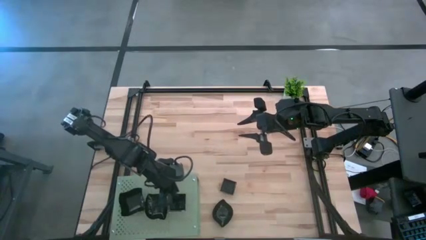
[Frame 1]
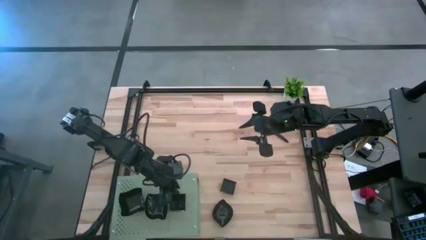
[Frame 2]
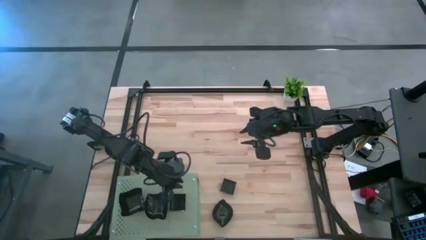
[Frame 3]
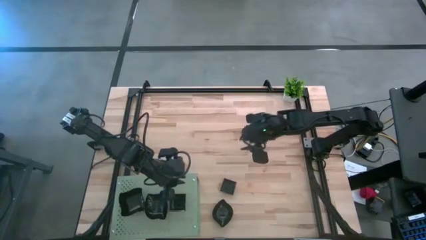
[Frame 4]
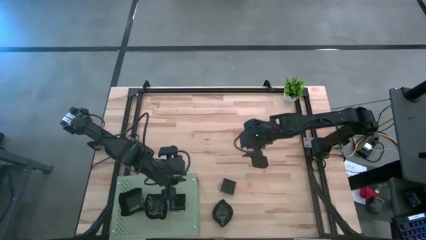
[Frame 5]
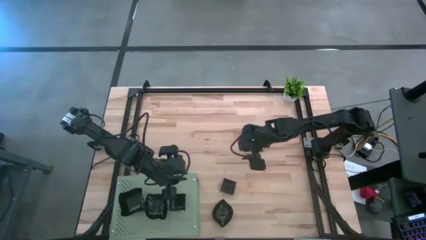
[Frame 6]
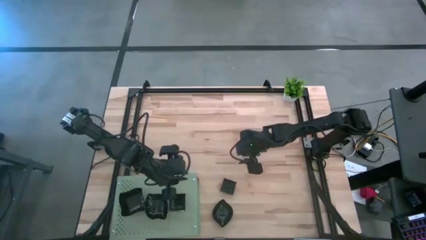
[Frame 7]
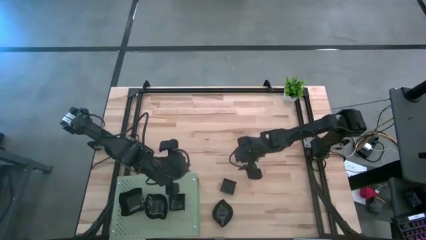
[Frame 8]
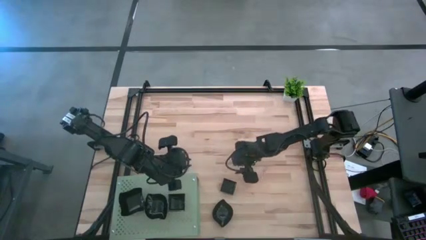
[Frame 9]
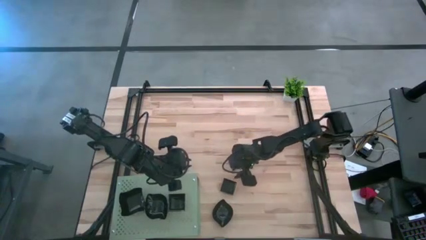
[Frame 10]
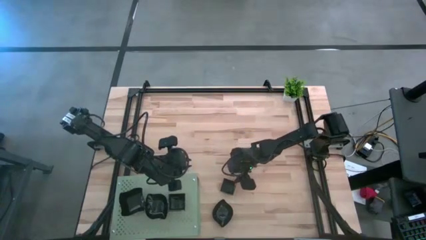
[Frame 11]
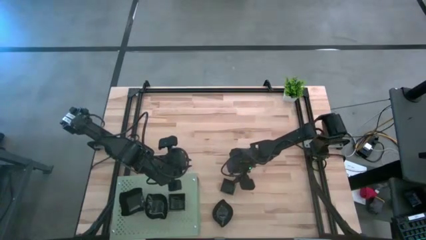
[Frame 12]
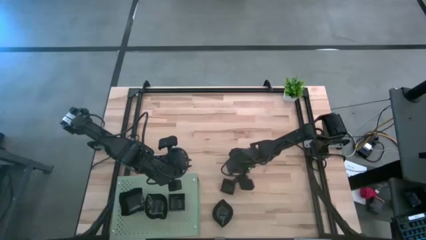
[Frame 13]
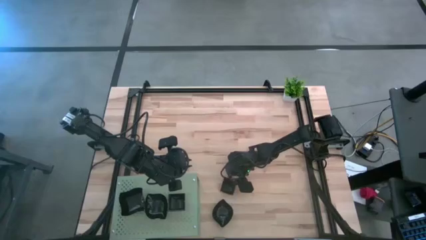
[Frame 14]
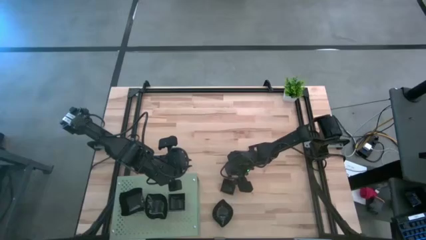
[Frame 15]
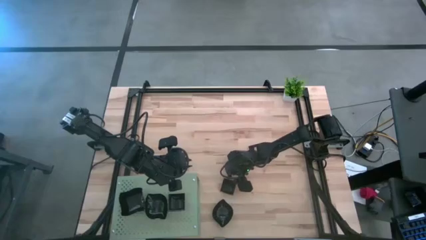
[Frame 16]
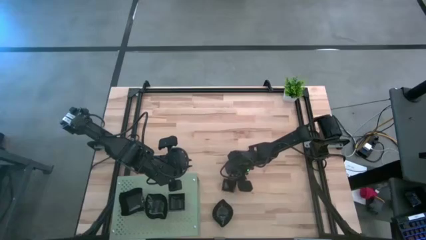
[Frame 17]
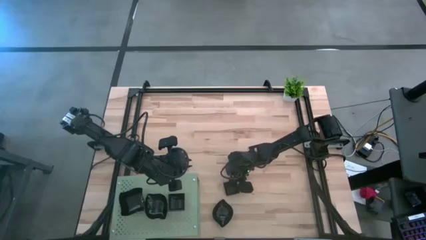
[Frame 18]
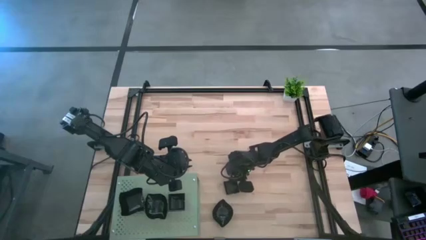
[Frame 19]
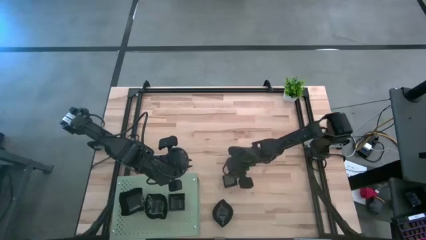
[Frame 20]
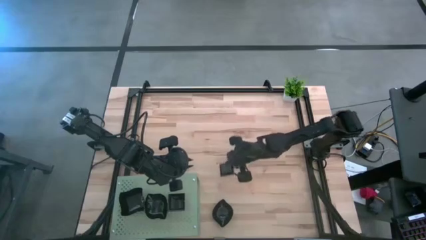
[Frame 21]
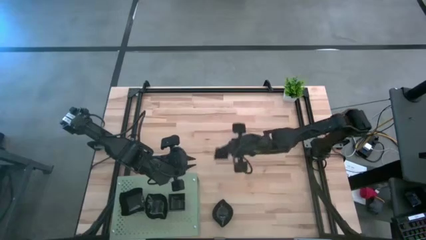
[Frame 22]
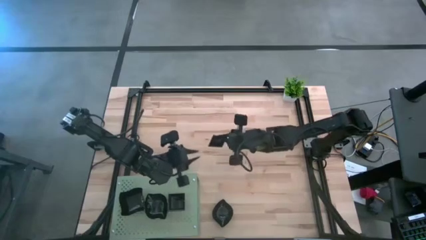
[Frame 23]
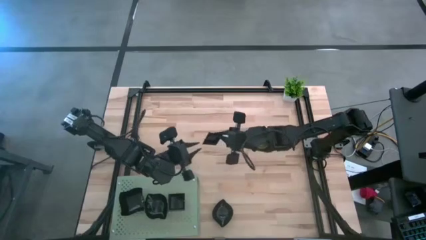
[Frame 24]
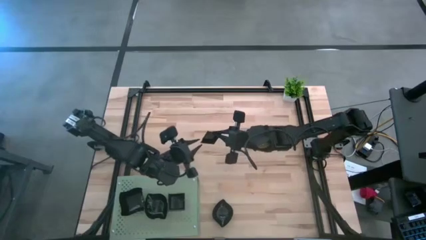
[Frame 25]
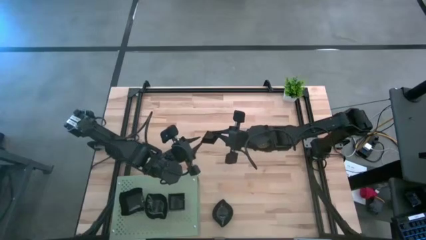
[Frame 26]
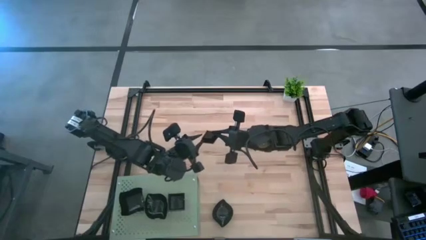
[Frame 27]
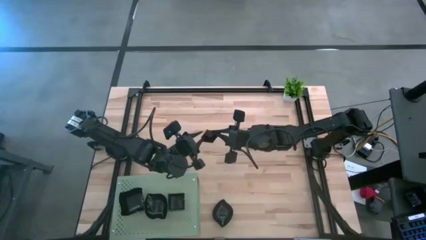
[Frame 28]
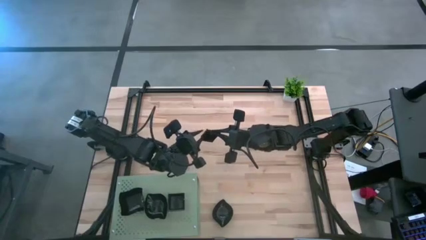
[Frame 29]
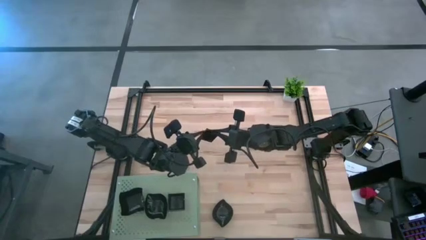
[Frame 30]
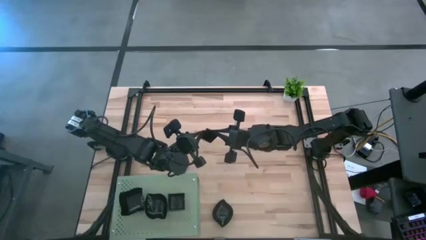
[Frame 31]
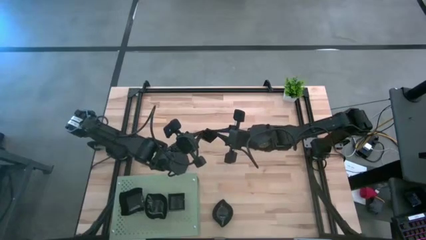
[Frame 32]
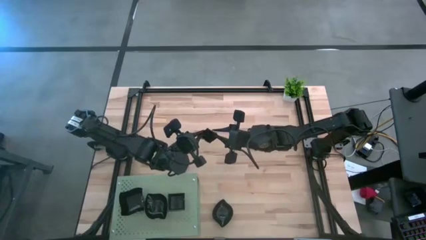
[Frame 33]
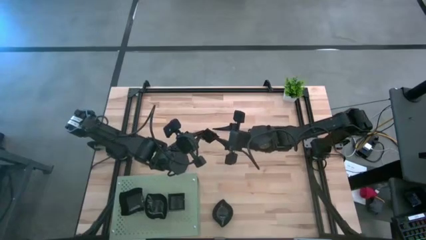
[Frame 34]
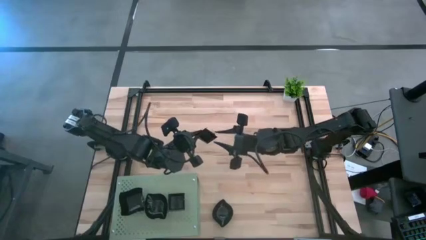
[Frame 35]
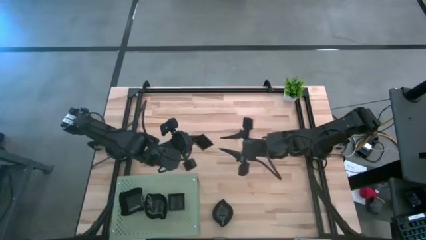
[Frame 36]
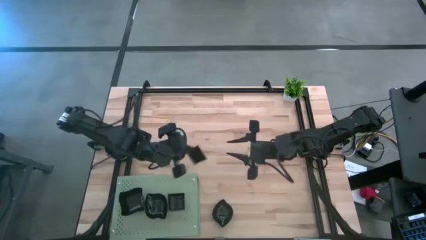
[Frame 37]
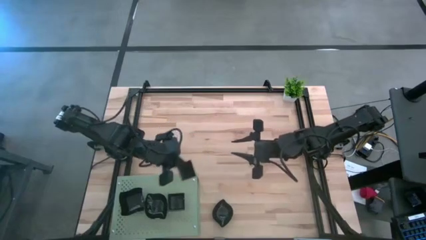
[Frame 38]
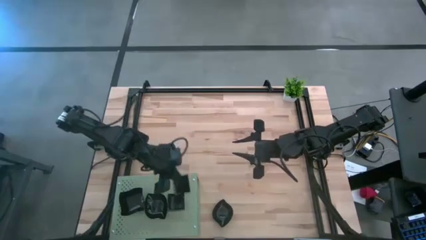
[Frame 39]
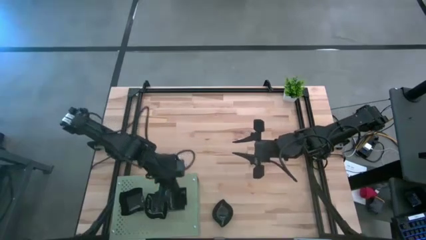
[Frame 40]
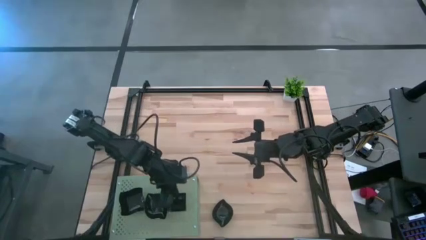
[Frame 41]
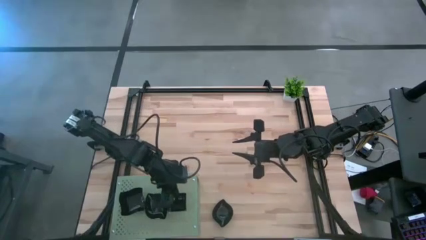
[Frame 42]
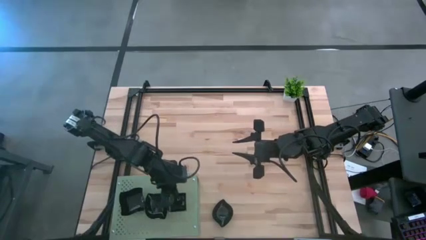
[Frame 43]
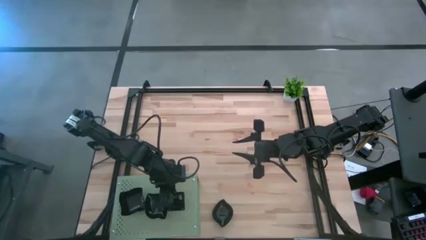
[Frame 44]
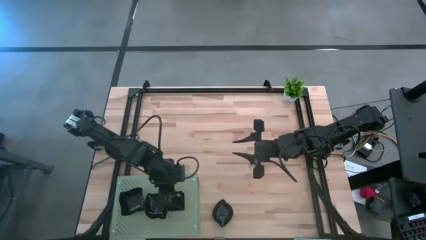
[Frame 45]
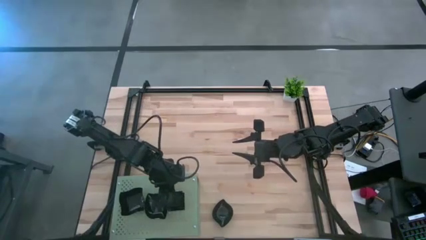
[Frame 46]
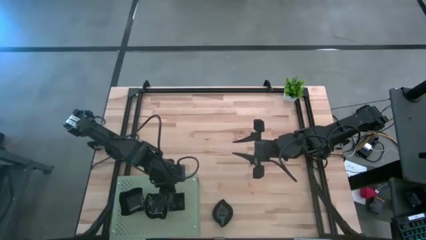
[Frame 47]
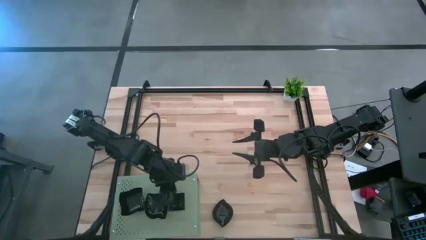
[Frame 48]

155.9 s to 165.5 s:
Task: Pick & Place Mini shaped plates
Stack the black square plate on top of the other black square plate on the shelf

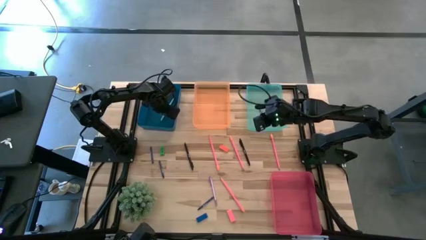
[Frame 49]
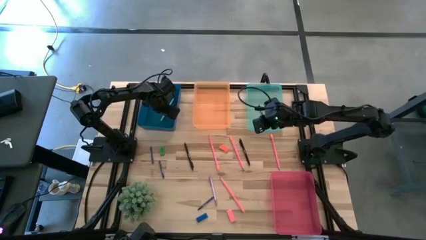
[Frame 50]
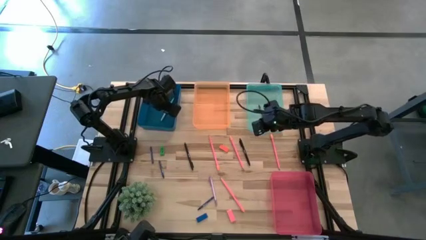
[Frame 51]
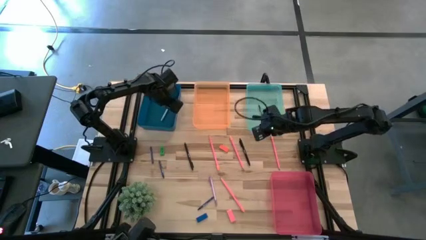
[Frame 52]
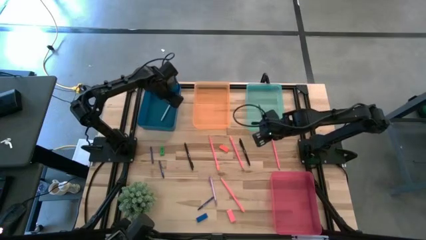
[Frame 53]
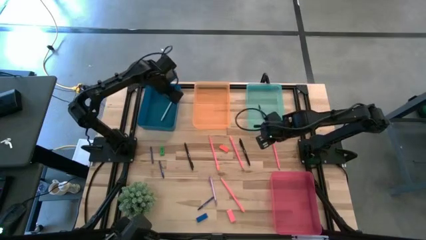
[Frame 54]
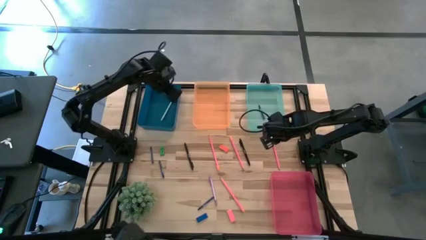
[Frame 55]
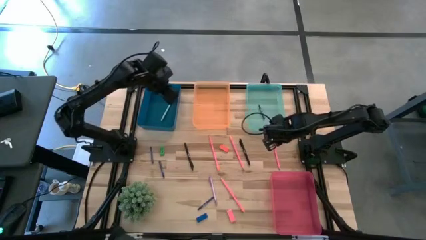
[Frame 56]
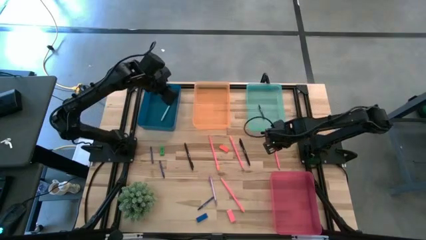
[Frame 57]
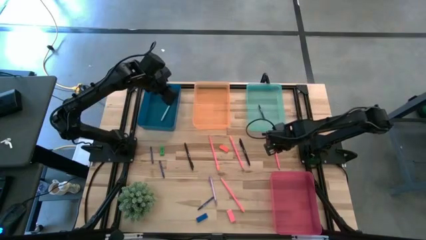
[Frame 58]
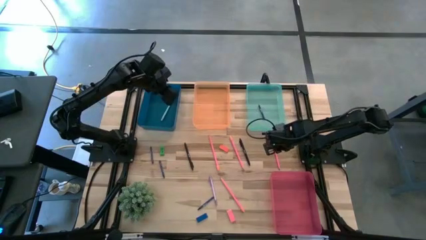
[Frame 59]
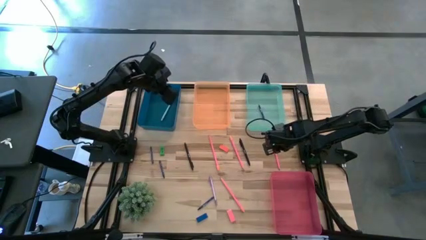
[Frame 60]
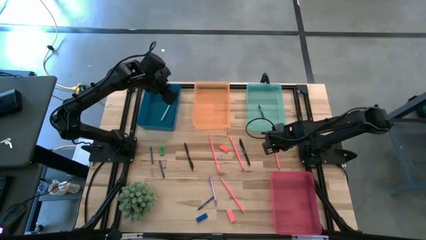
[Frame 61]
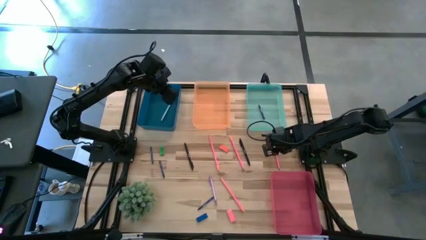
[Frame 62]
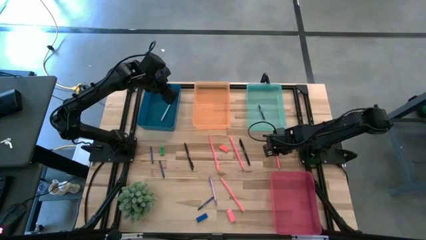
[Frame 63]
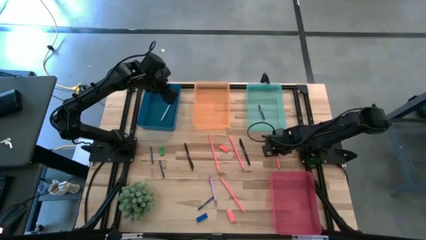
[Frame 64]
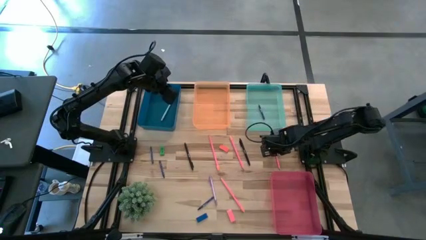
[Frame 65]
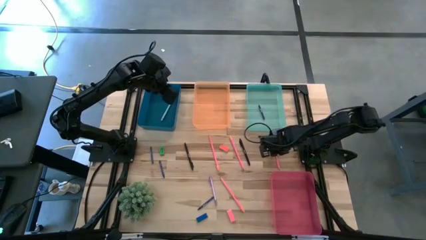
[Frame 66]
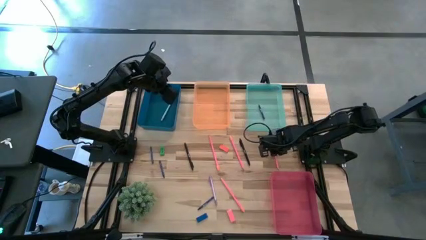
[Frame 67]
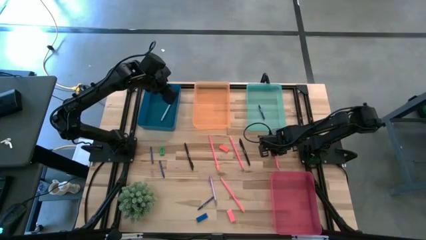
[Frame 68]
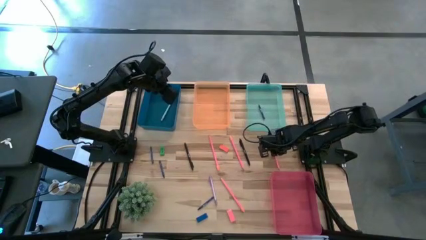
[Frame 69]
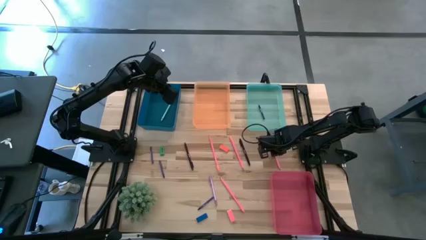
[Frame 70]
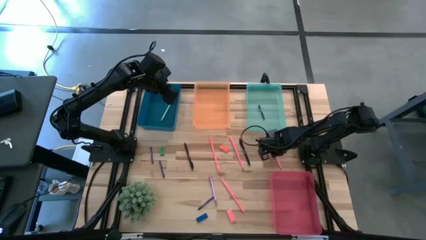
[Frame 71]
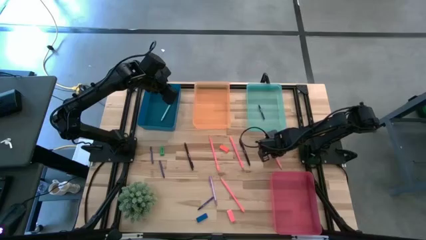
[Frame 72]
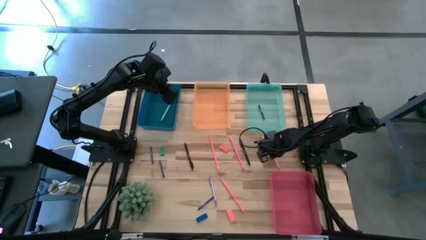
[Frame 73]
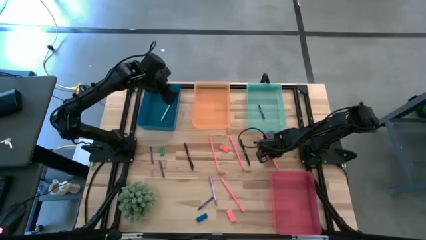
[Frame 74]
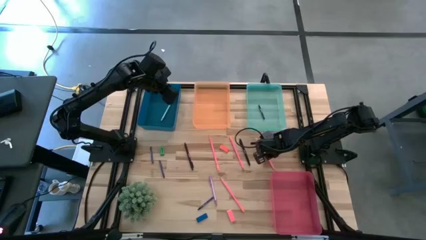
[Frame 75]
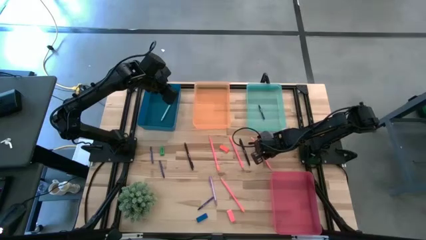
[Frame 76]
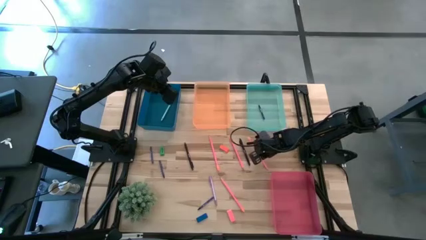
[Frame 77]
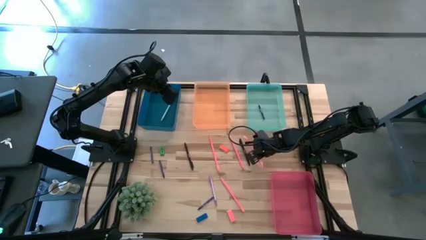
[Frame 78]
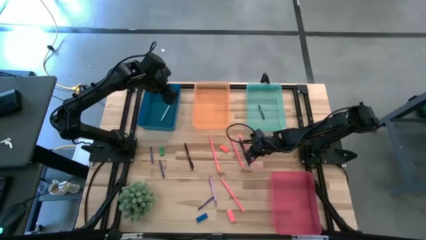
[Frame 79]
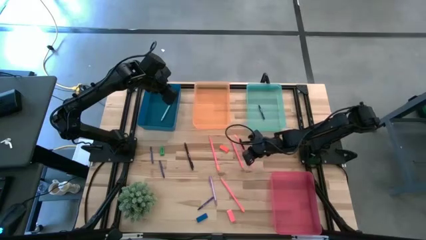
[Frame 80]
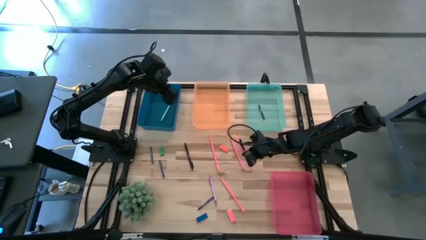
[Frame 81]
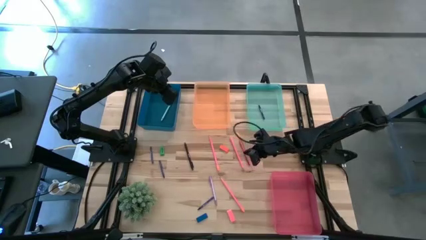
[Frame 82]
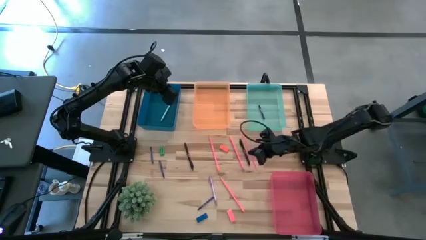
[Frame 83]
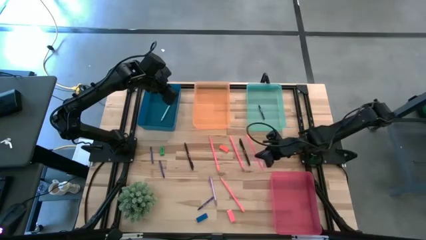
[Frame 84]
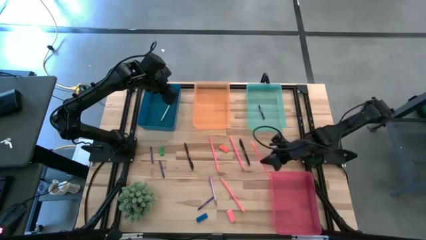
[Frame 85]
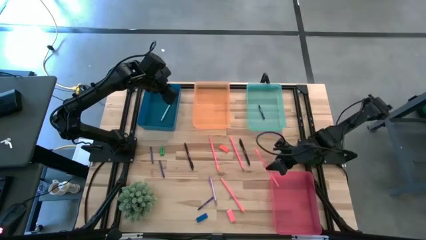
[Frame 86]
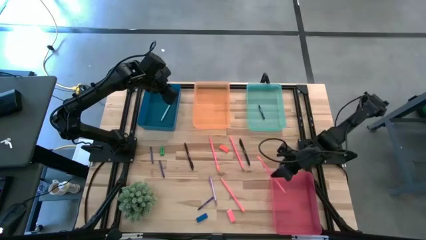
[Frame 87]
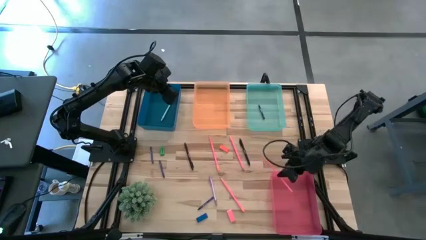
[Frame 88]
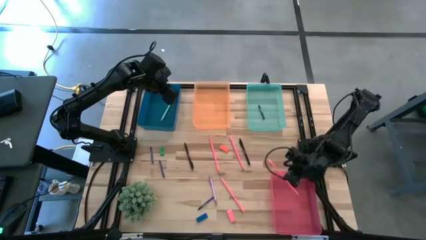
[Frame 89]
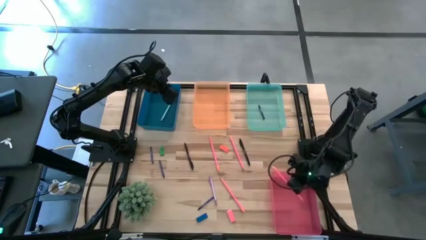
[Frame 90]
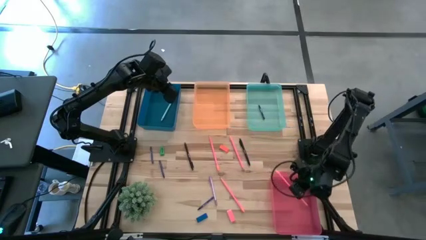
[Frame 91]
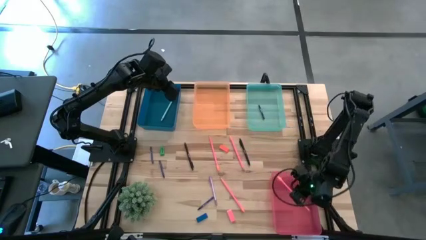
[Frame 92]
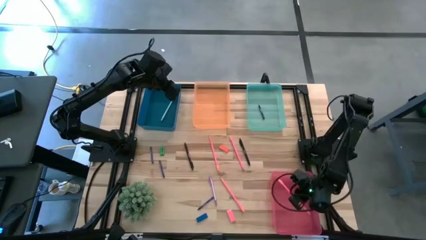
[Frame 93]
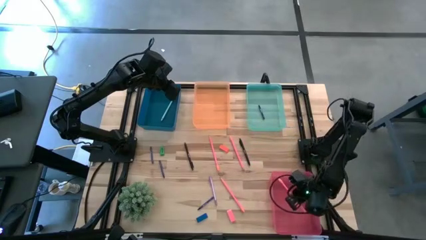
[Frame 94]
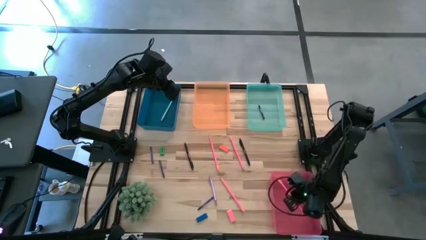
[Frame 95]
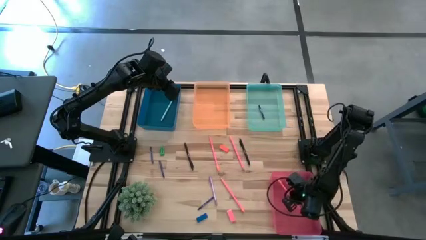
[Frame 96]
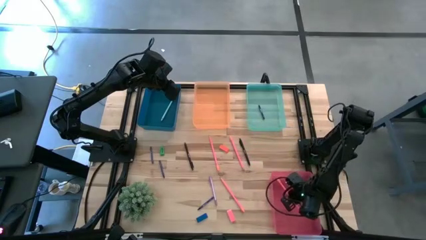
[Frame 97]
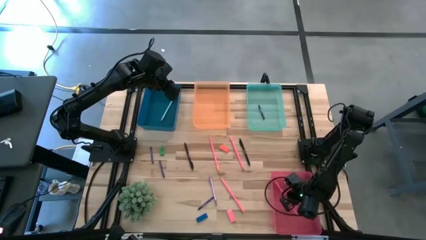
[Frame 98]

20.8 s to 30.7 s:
Task: Sort crayons/erasers/pens/pencils in bins
Put the pink colored pencil into the pink bin
